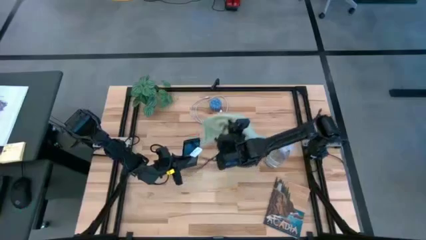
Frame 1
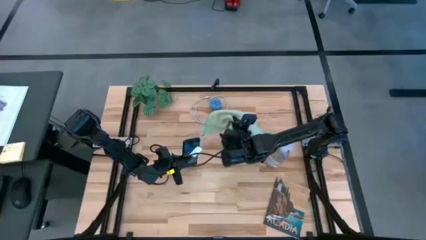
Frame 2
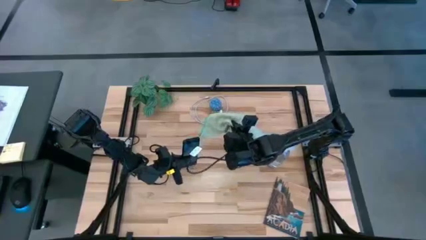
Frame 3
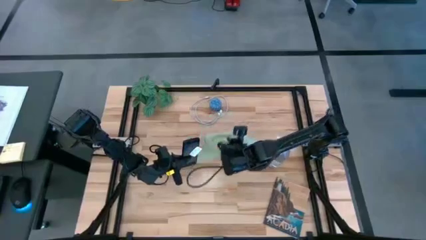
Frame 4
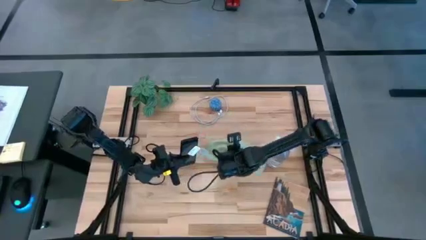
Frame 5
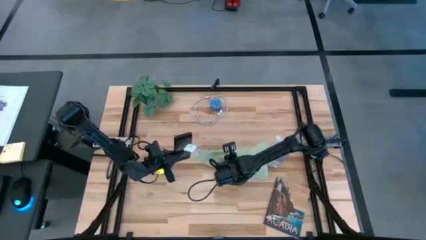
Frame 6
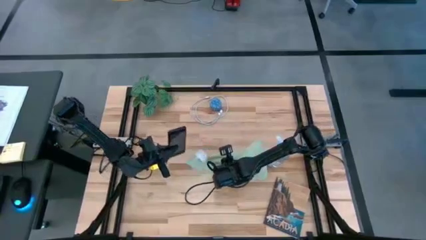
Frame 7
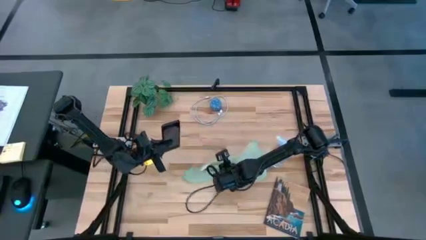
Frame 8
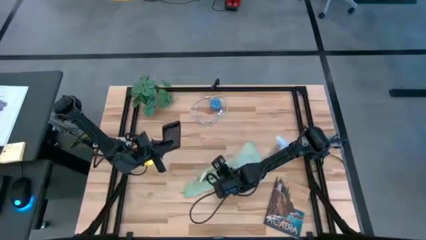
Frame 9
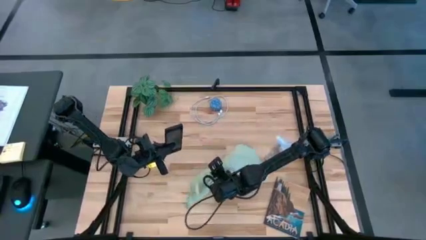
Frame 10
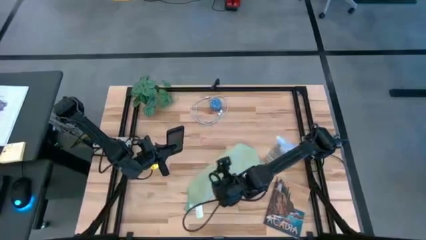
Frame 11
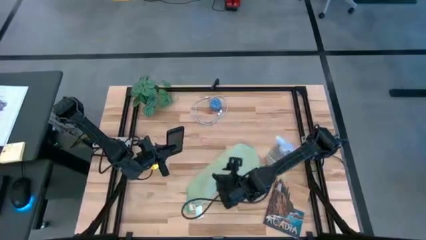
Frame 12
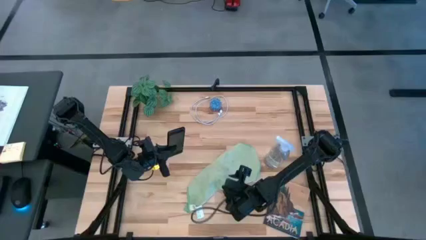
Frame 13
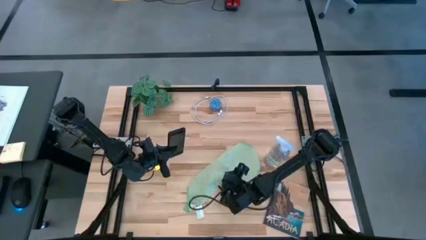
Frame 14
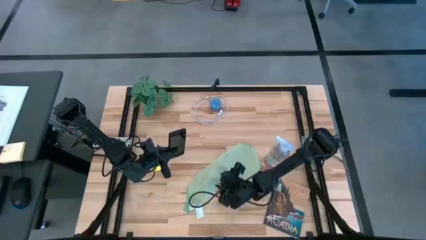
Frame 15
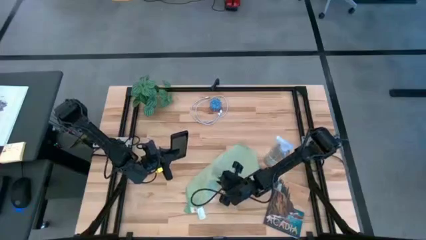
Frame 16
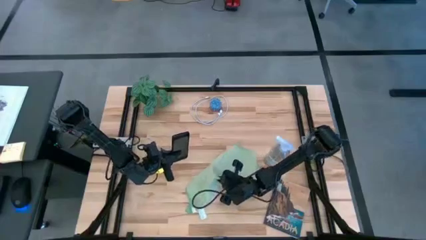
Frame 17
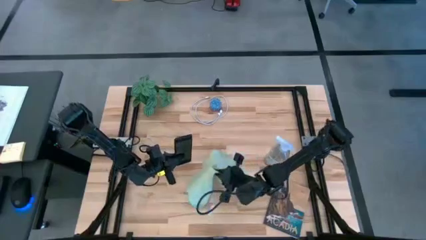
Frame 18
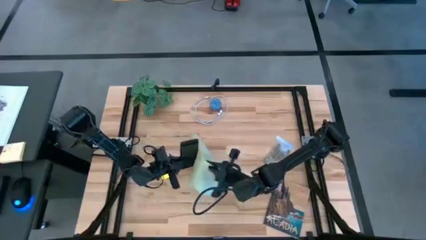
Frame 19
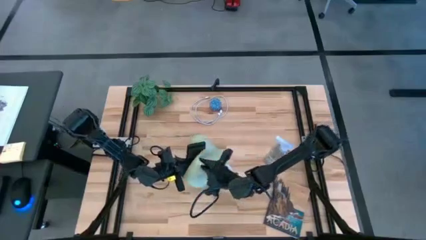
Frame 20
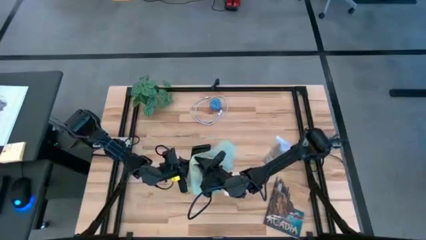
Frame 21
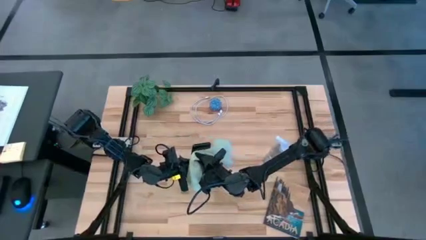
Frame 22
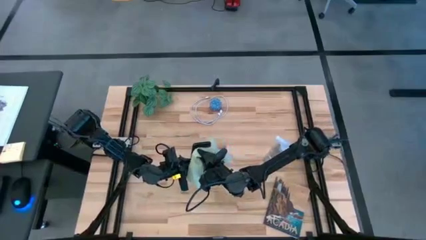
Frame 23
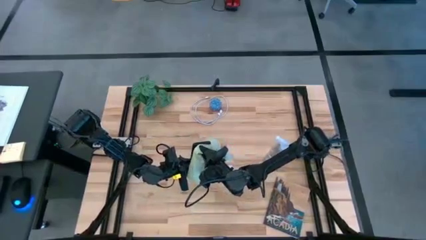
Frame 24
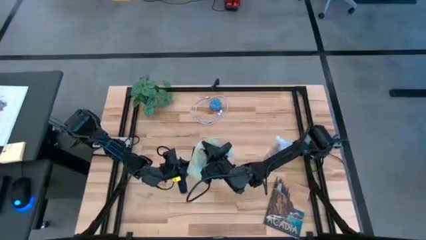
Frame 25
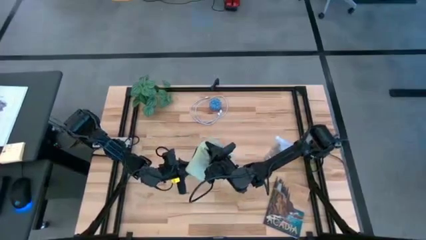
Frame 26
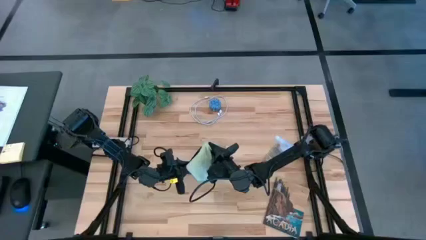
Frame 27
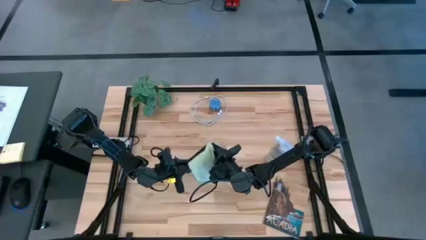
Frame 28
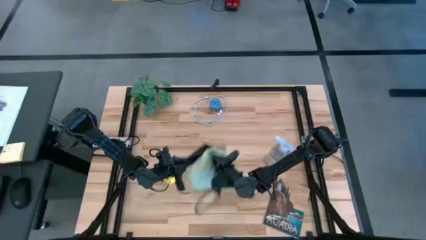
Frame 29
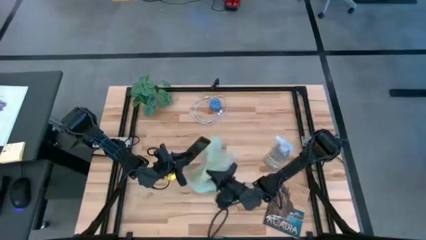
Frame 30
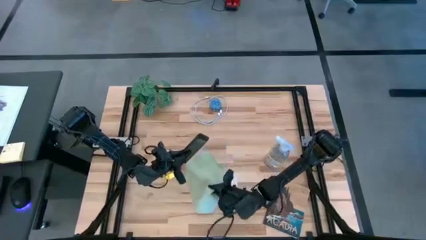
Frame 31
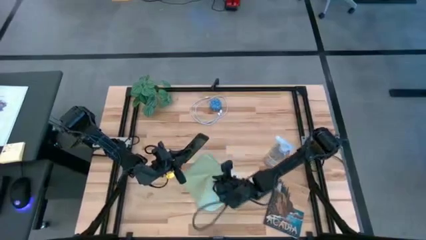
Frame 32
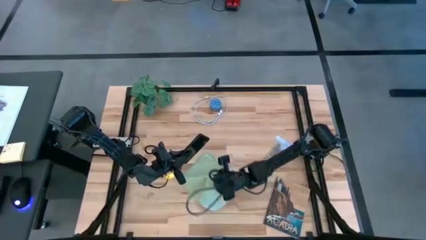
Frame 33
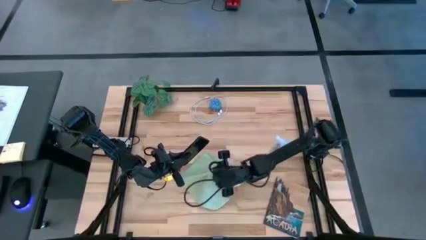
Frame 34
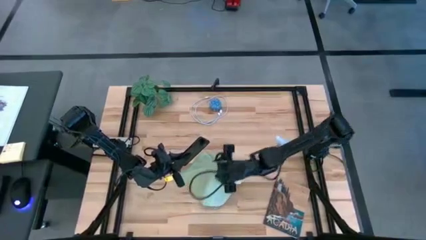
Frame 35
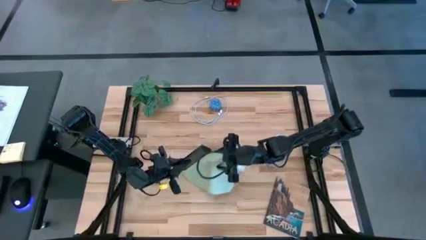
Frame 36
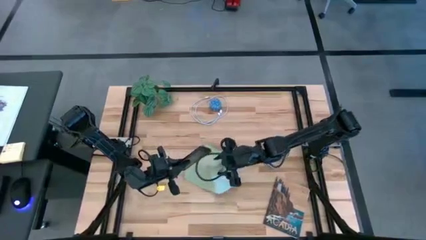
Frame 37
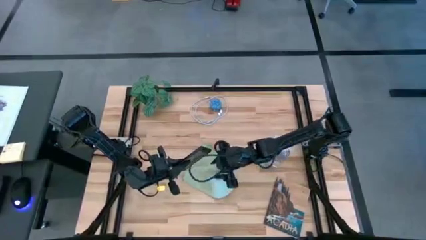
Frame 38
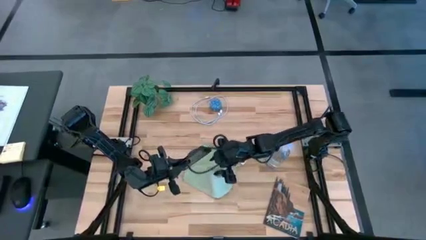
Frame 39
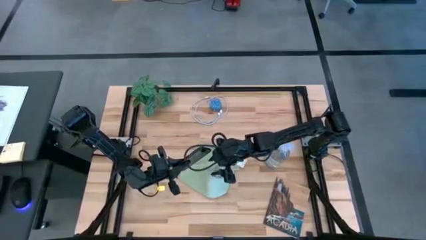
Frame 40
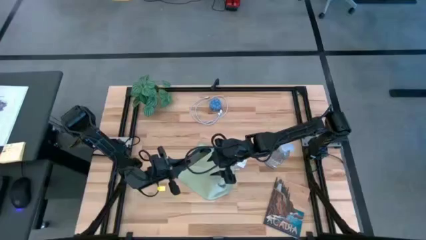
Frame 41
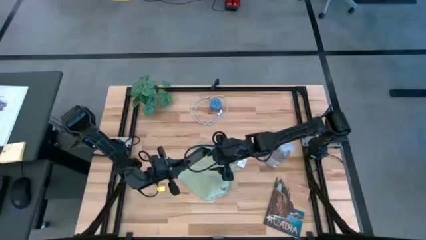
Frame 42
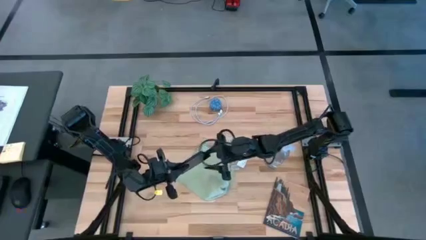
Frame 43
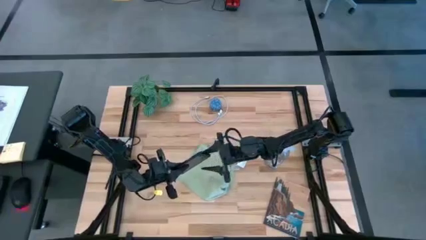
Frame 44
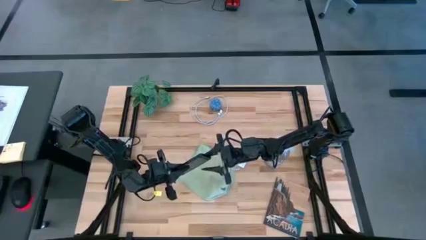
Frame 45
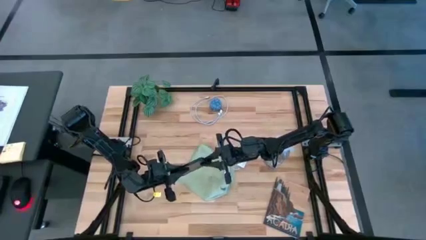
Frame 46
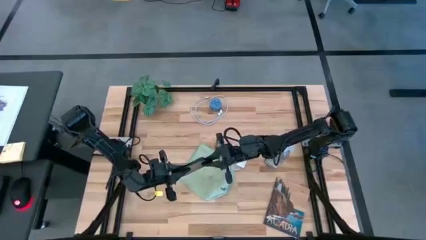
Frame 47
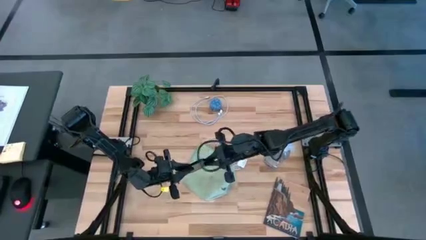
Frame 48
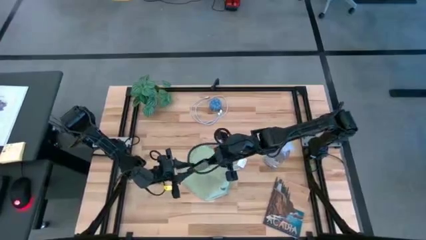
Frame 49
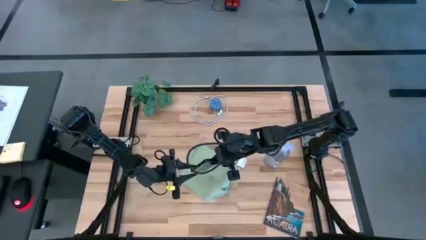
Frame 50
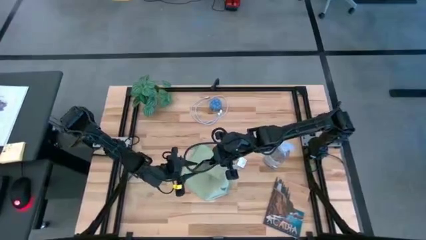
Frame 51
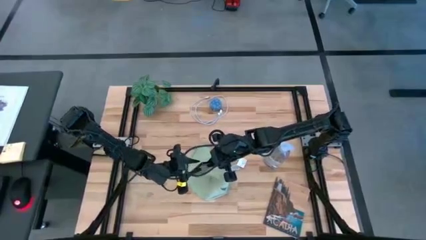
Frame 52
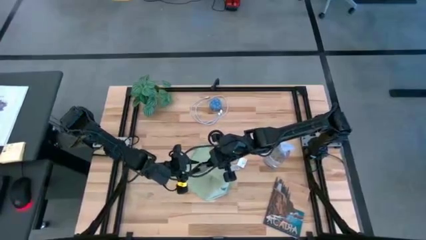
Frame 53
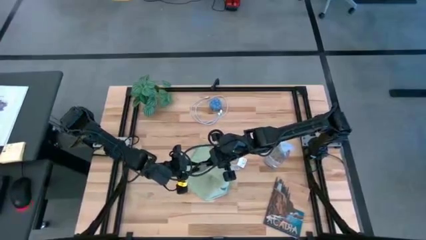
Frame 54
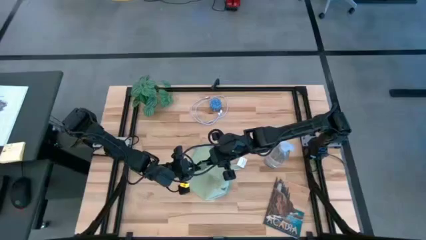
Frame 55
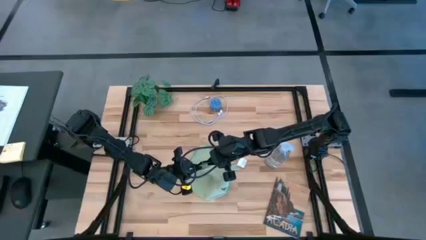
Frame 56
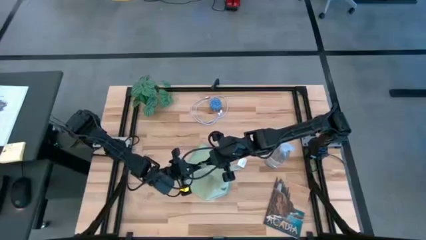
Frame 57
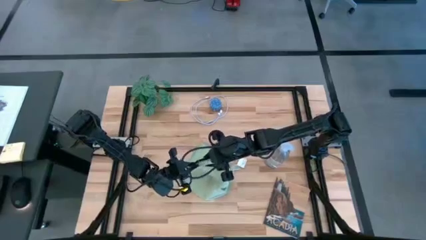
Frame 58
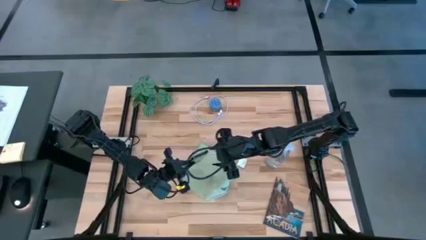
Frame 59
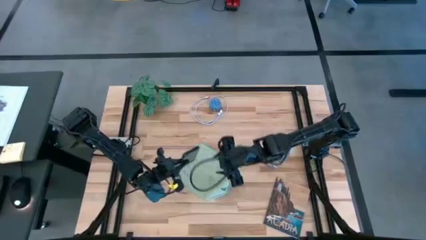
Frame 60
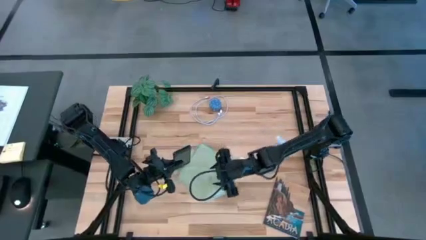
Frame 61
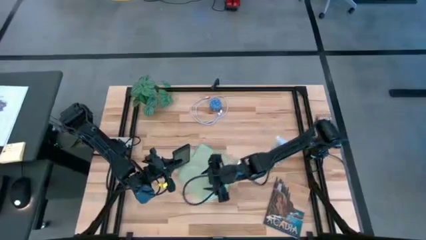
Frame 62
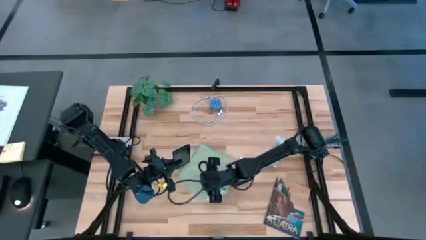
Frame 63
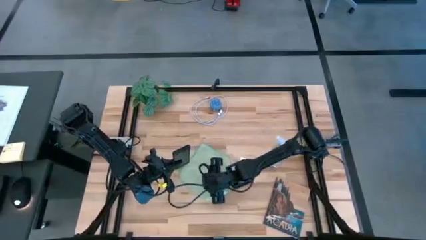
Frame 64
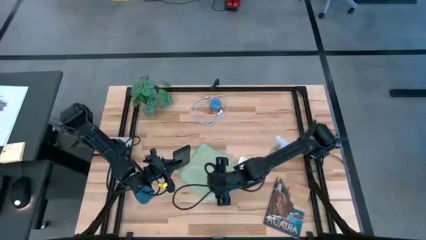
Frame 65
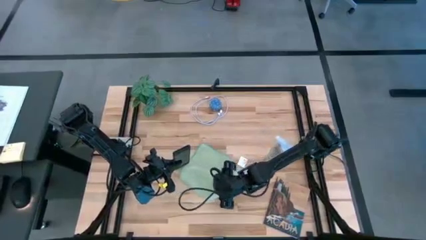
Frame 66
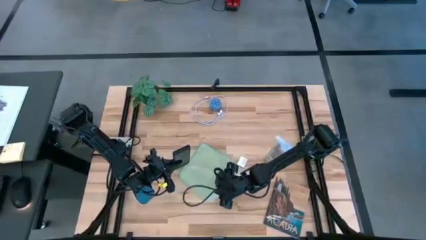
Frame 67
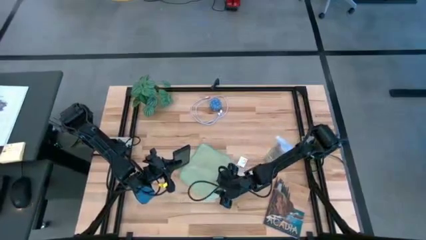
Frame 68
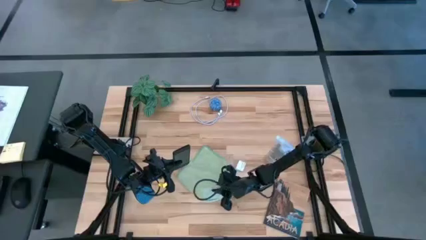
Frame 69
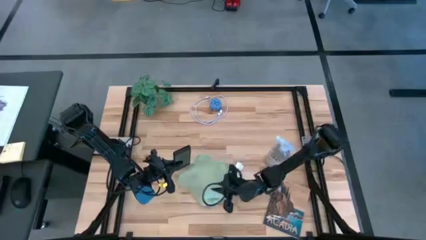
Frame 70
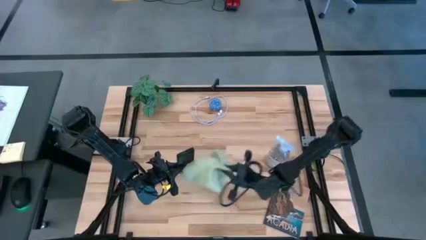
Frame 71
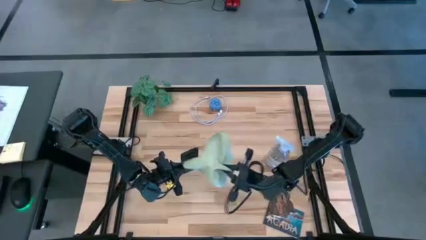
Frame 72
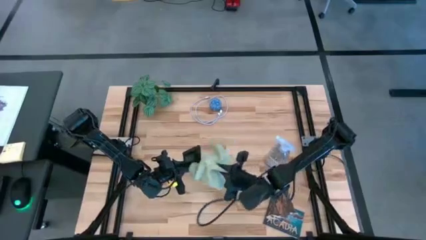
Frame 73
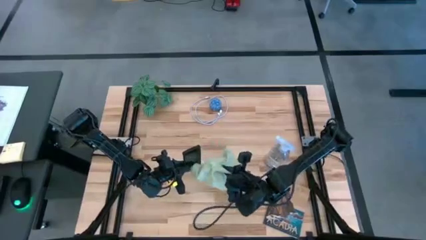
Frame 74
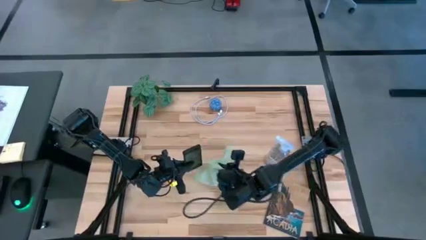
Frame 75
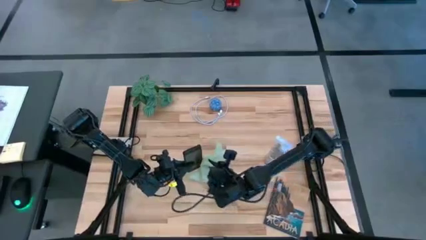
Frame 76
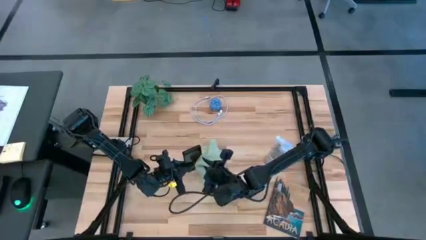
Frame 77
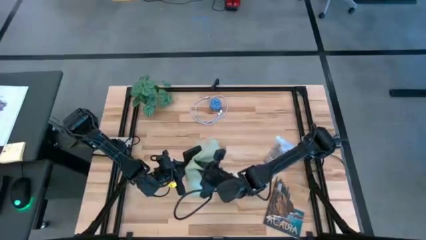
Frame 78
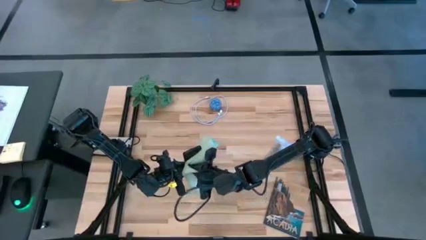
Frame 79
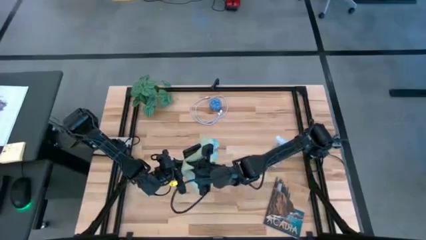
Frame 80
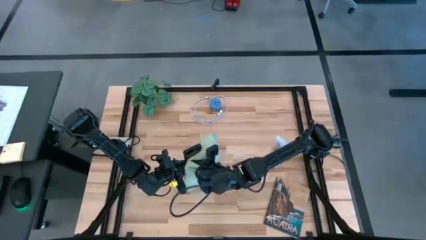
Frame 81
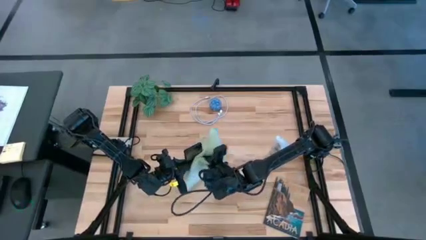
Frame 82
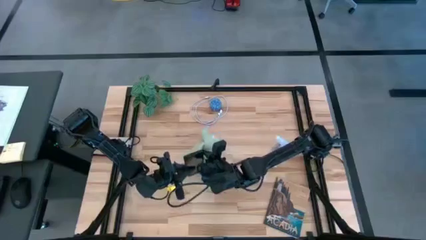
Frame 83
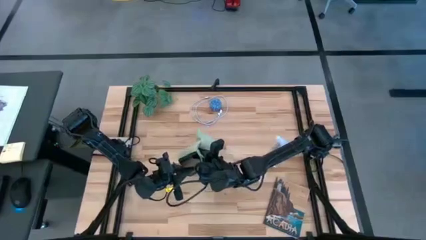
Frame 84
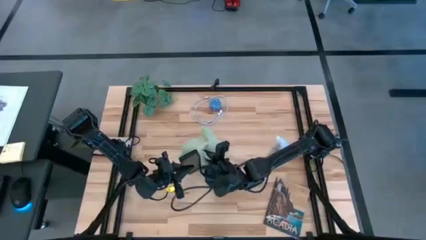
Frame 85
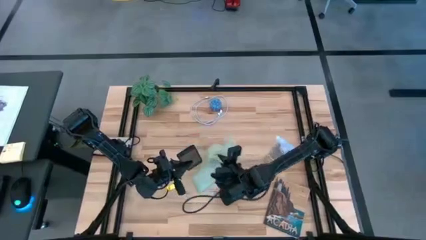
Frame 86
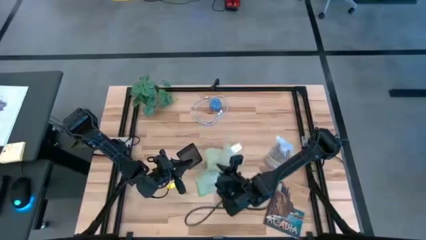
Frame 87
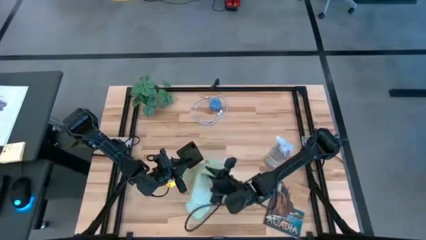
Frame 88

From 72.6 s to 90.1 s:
Task: Apply microfiber cloth
Wipe the front of the phone with the light green microfiber cloth
